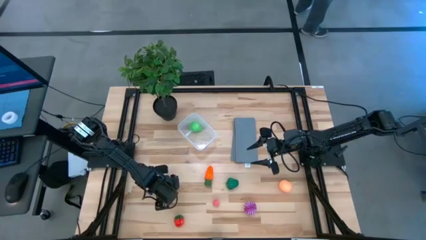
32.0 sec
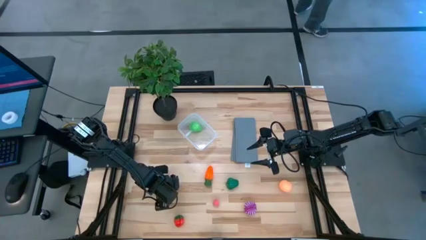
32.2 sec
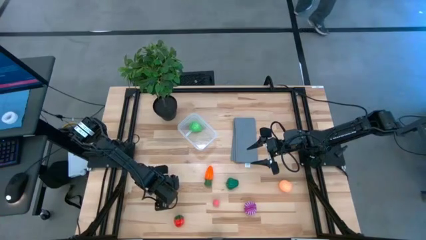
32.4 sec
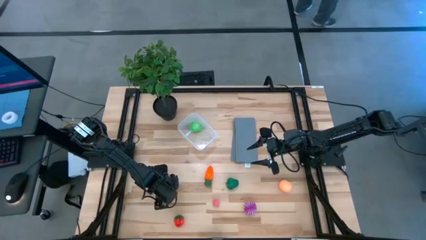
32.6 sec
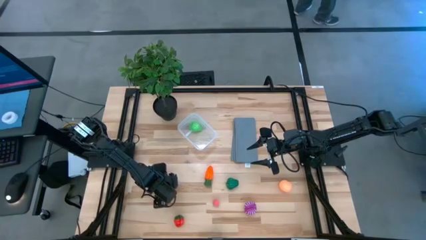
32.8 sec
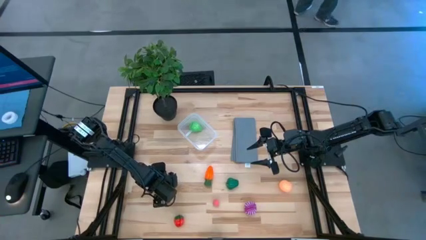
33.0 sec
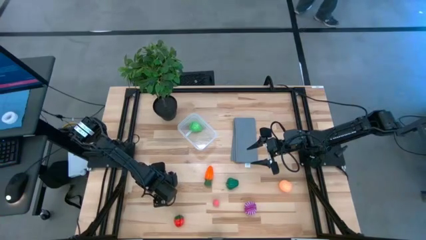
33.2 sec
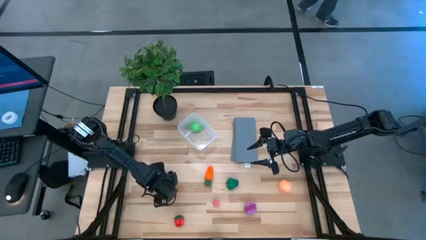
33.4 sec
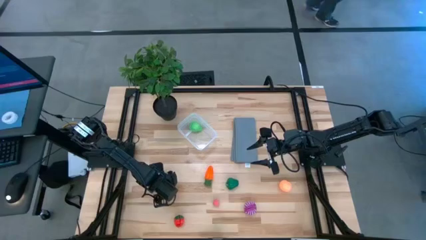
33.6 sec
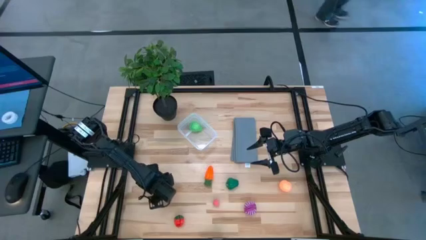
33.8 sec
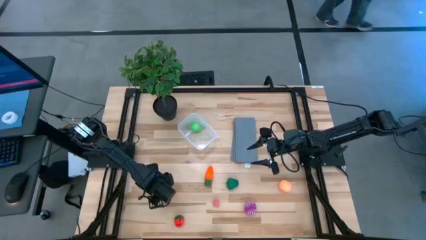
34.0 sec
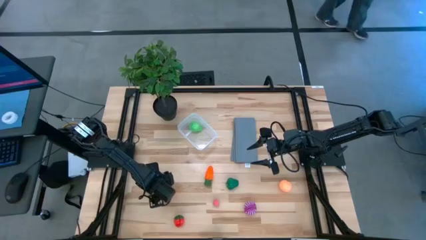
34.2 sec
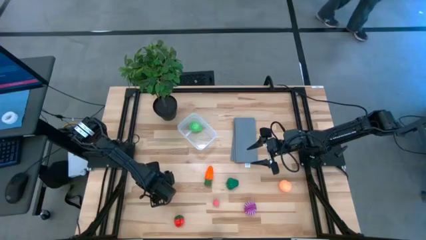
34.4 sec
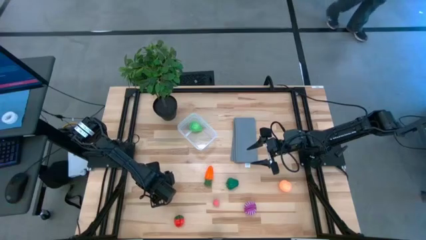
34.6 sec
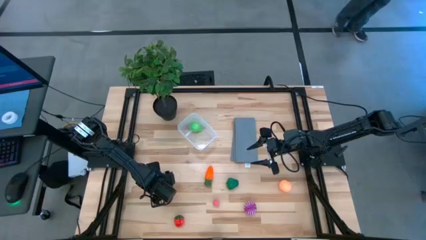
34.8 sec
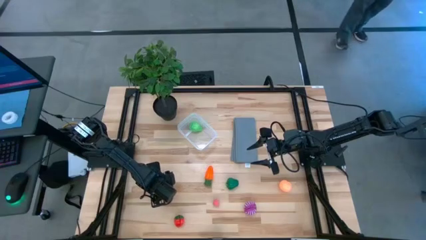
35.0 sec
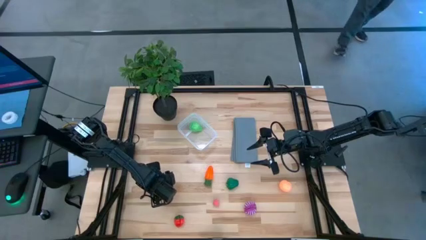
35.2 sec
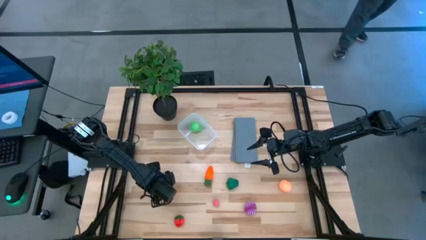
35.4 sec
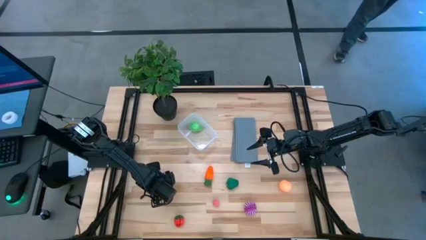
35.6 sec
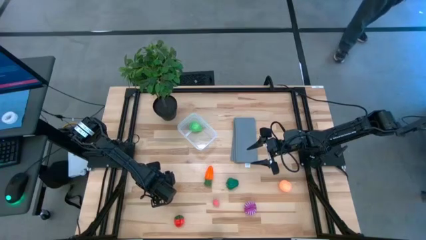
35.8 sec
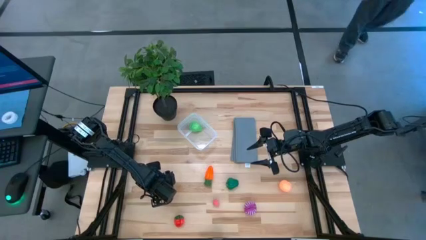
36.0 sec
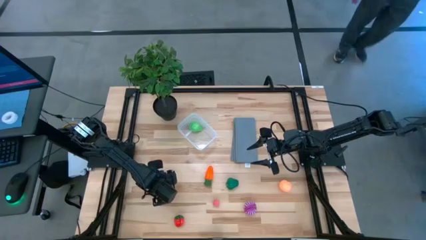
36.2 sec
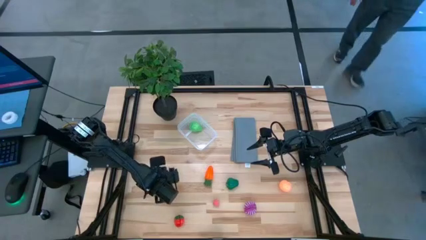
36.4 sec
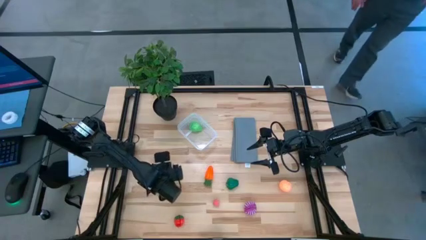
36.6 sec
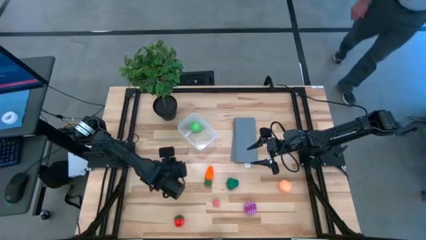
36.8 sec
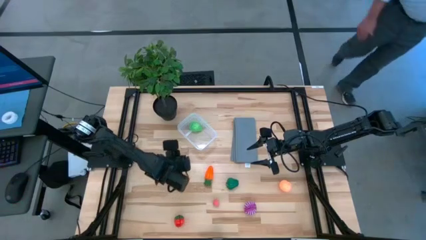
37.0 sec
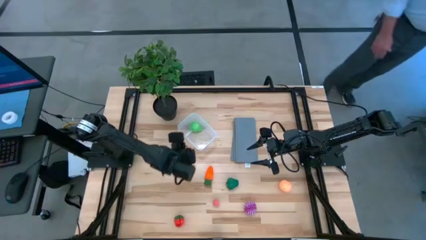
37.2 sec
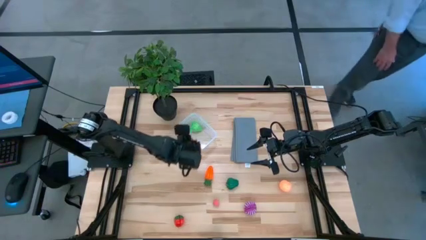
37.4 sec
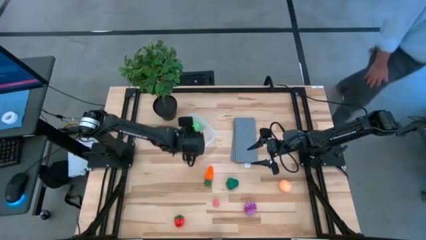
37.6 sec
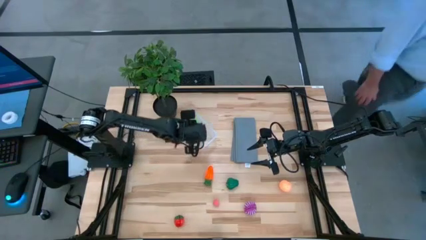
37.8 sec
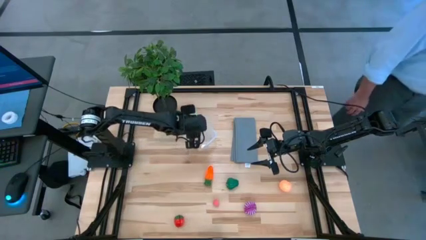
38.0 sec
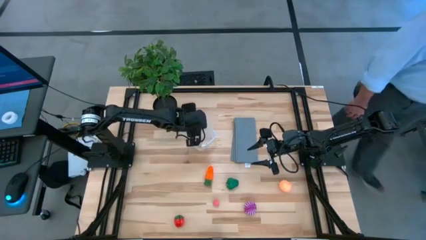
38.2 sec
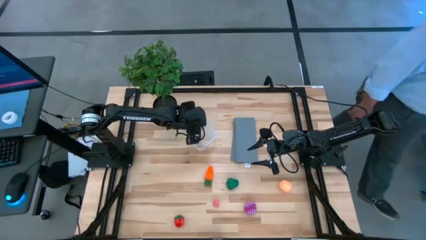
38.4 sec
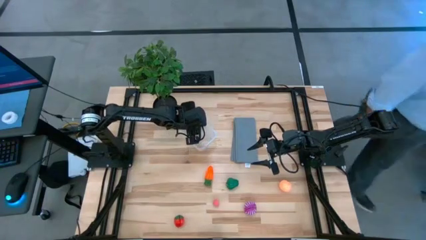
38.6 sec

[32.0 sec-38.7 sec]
Task: Pick and placing Produce into tupperware
Put the red strawberry into the transparent bin

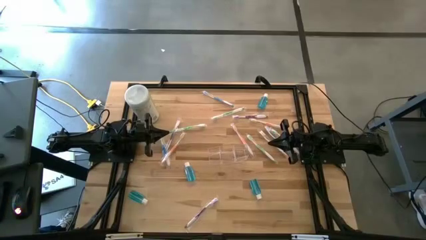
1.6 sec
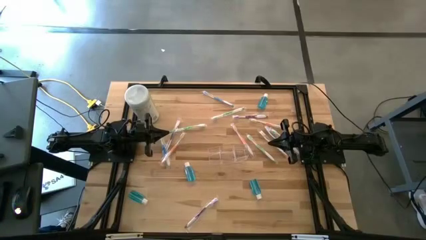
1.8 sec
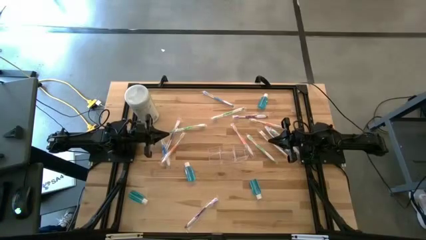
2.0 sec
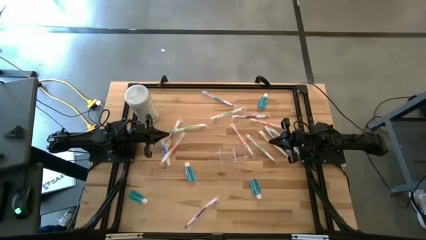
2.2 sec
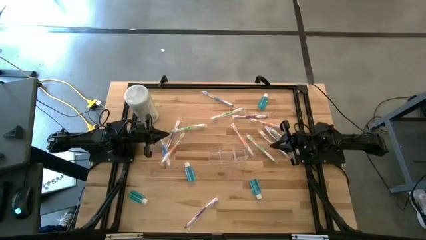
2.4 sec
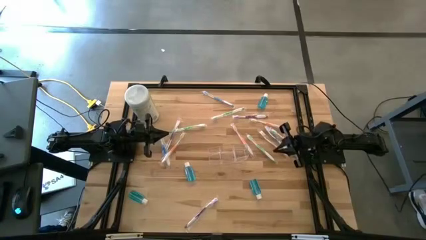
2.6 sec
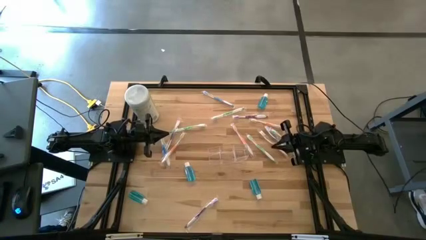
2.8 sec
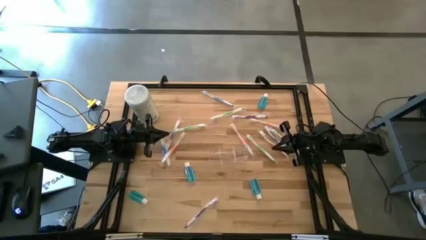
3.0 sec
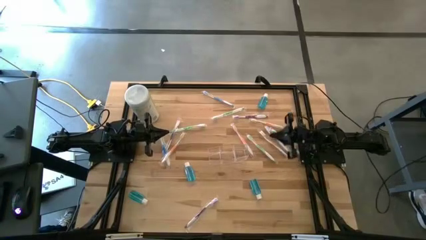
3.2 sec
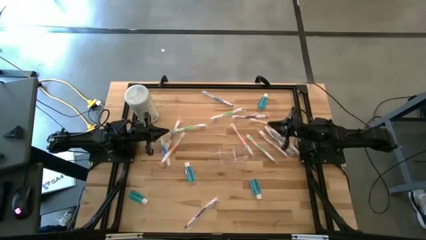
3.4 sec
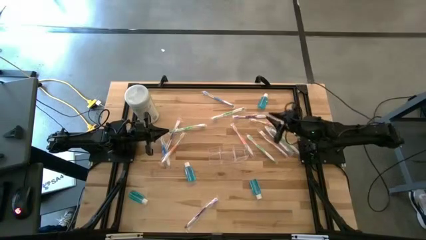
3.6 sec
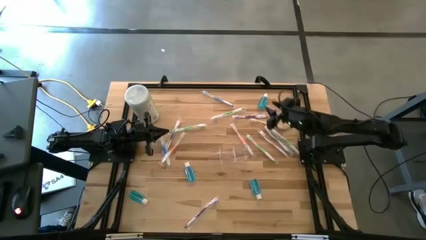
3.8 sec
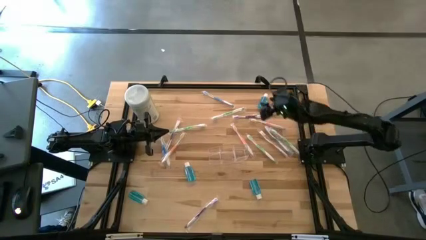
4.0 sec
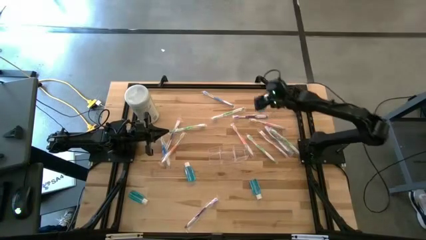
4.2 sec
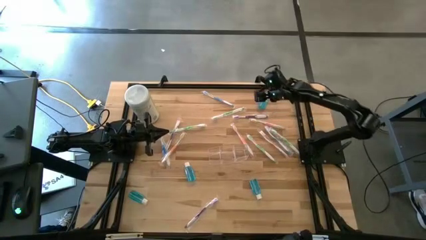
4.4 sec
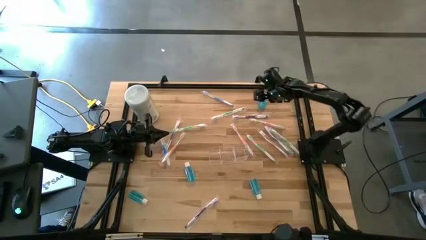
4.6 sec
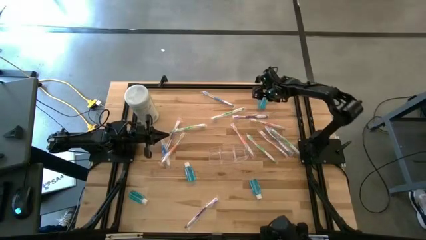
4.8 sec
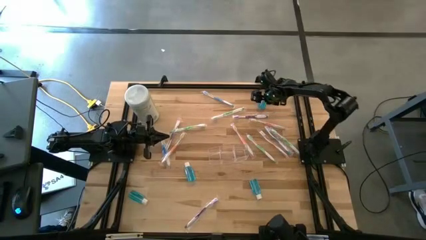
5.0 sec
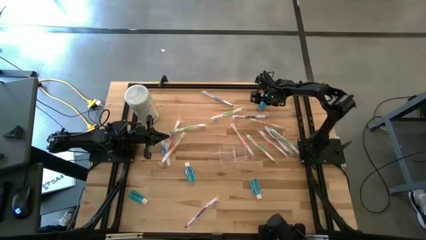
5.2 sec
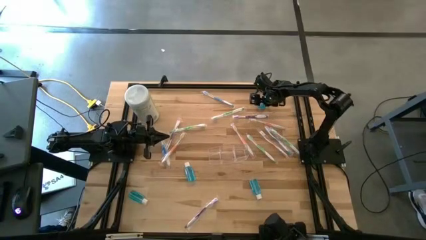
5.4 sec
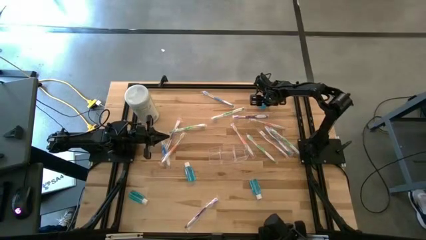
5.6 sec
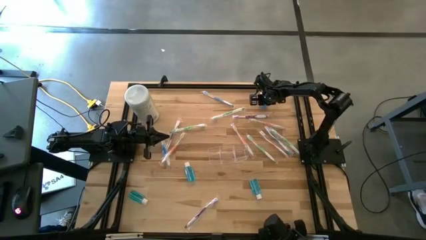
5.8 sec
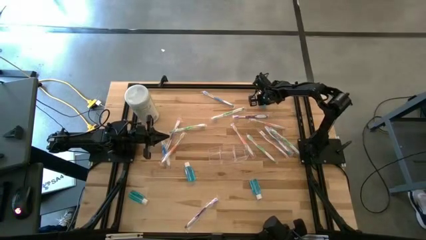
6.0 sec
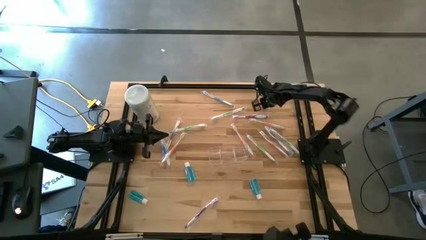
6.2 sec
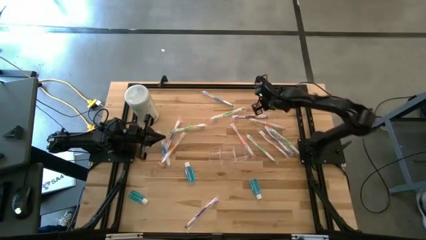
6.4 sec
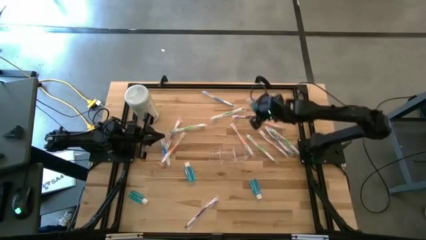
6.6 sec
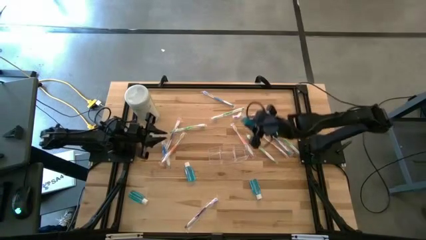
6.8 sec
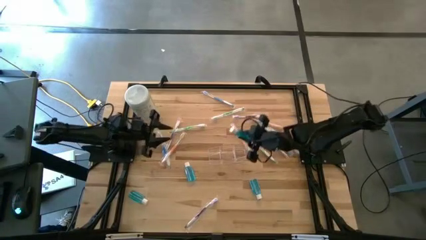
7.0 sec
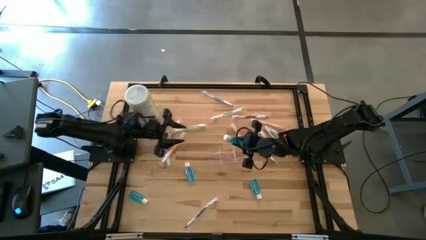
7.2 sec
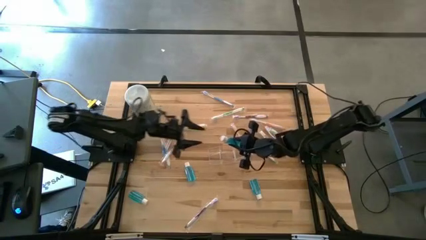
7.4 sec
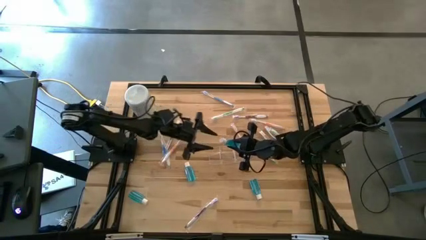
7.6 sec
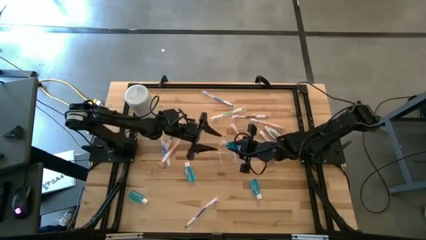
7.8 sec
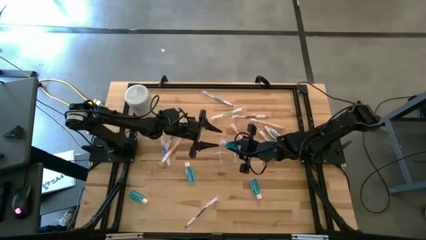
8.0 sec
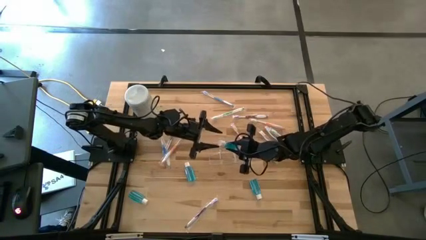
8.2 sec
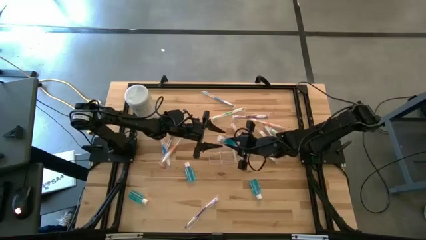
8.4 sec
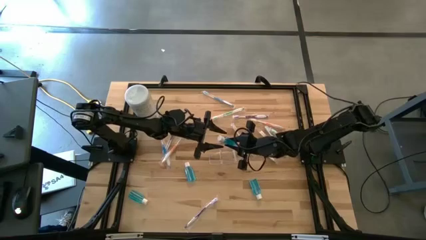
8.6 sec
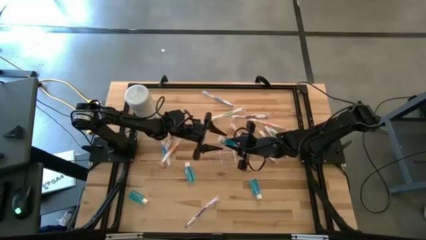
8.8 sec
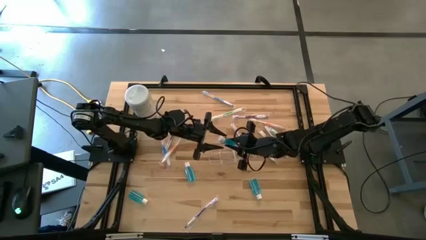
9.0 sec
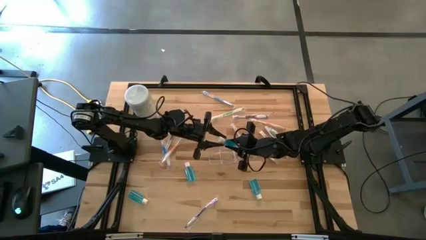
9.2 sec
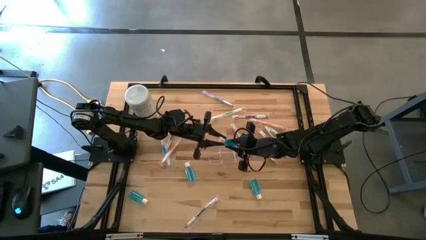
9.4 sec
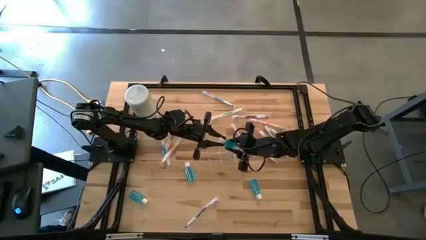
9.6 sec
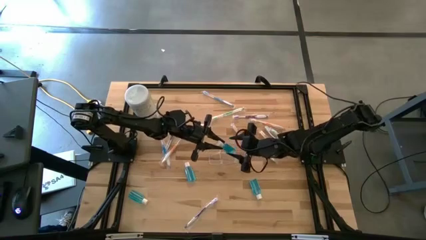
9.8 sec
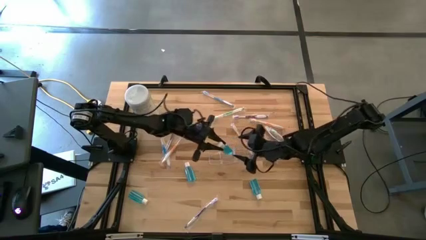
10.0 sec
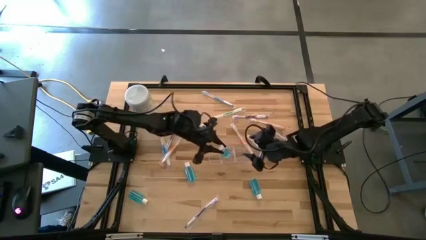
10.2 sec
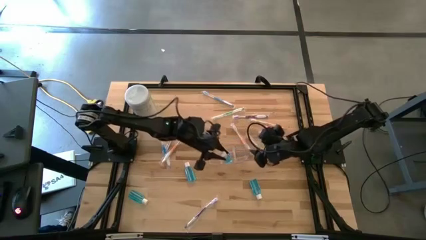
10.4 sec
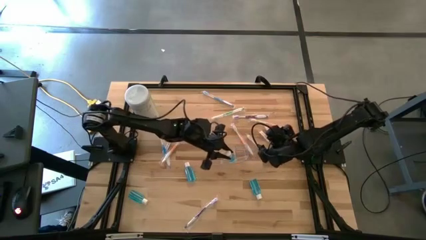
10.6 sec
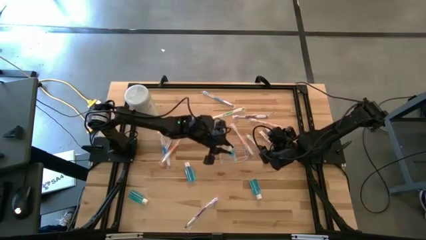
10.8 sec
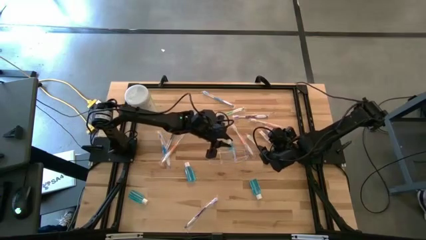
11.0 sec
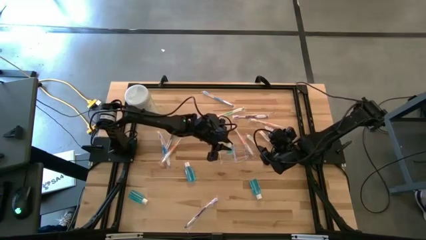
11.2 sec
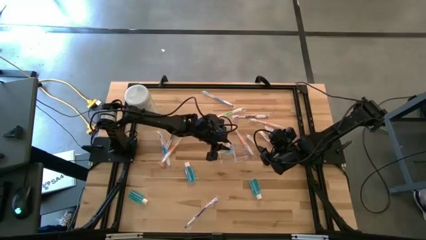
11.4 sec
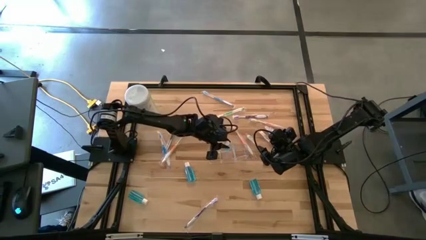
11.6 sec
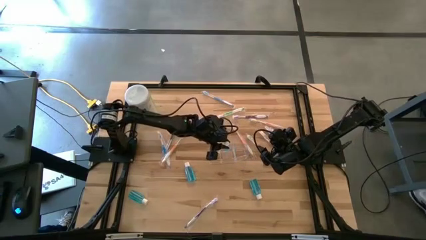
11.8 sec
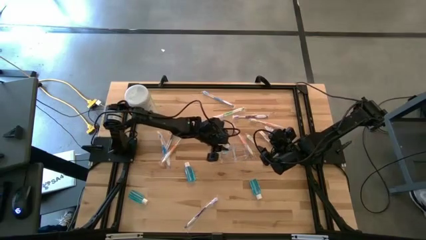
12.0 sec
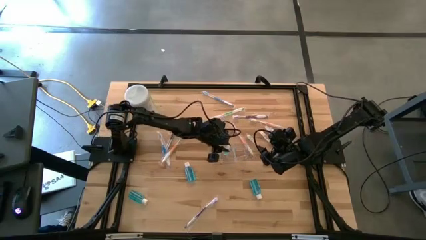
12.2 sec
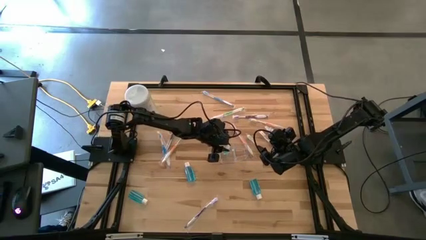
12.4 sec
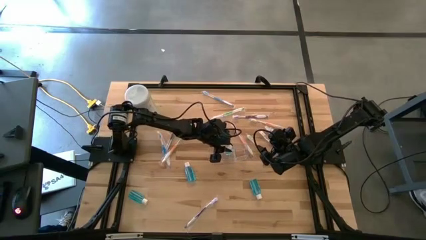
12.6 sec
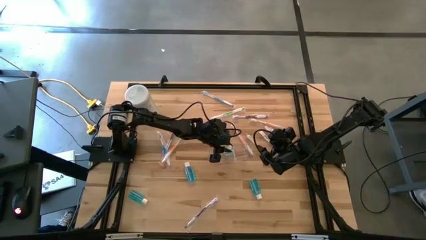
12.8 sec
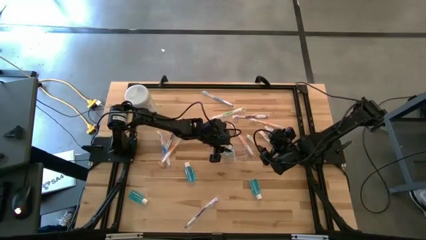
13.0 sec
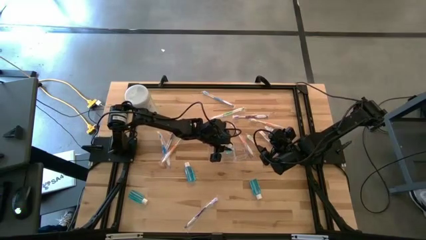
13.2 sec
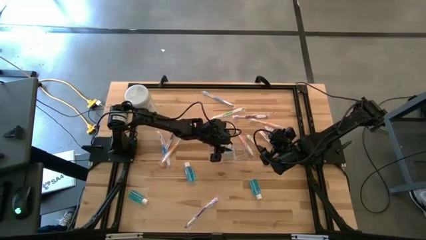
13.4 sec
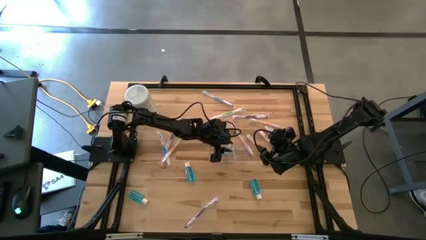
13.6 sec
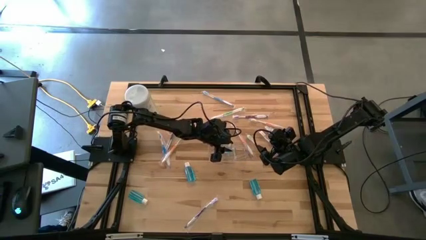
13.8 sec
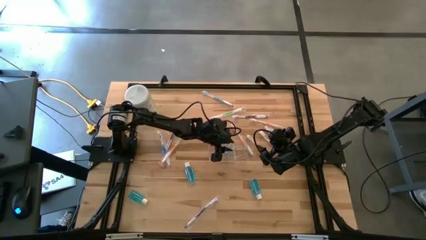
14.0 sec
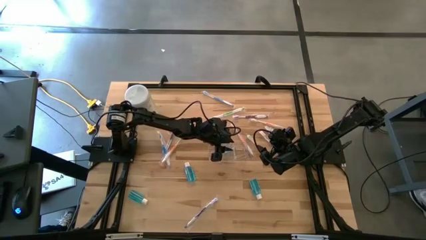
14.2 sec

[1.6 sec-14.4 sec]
Task: Pick & Place toothbrushing station
Put the blue mouthwash into the transparent organizer
